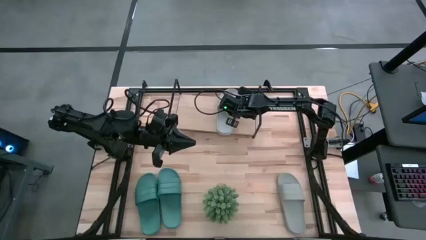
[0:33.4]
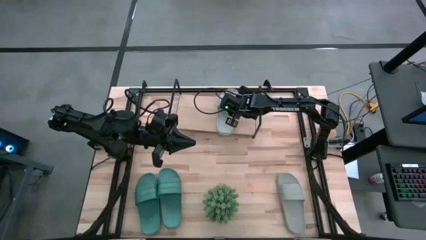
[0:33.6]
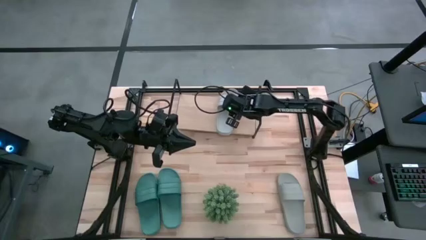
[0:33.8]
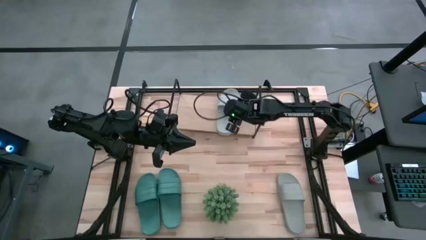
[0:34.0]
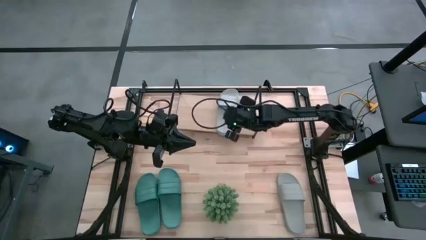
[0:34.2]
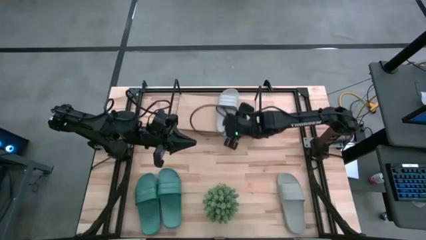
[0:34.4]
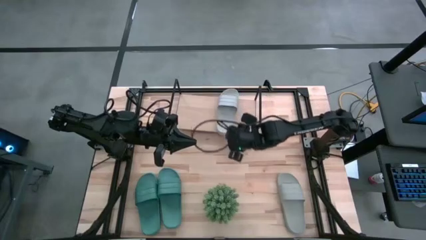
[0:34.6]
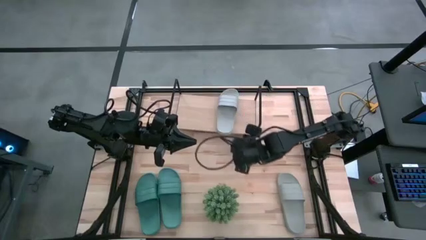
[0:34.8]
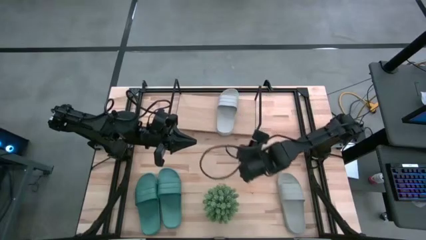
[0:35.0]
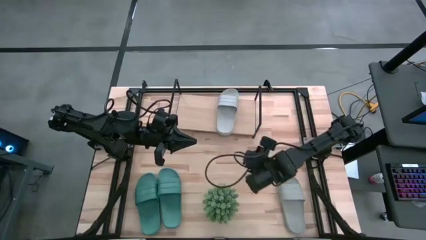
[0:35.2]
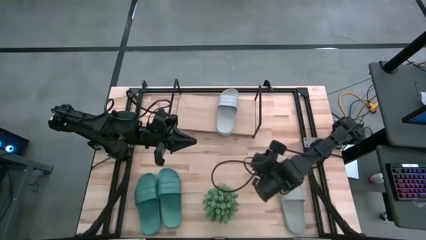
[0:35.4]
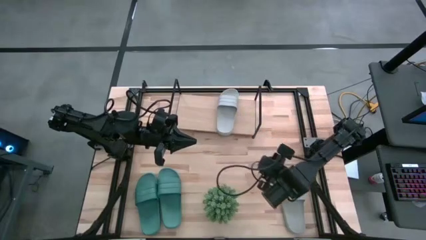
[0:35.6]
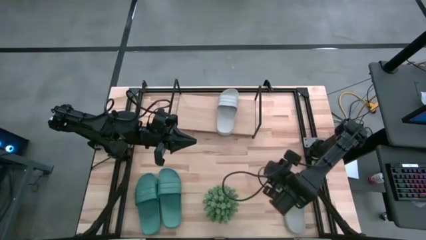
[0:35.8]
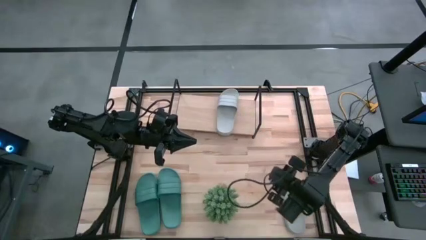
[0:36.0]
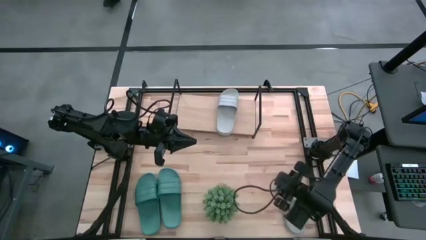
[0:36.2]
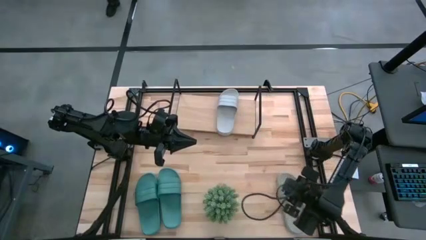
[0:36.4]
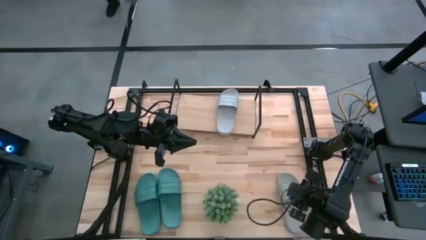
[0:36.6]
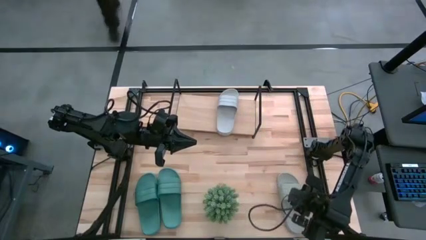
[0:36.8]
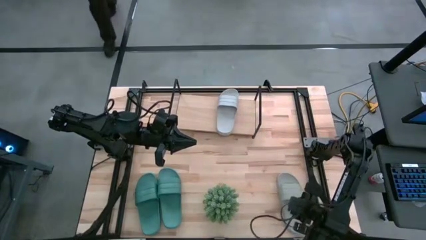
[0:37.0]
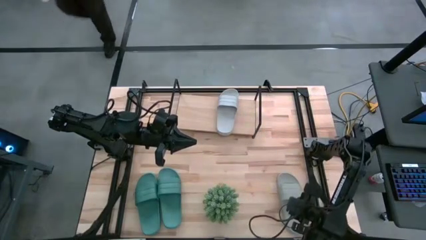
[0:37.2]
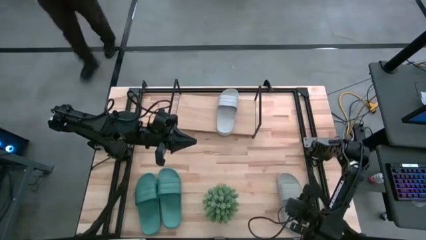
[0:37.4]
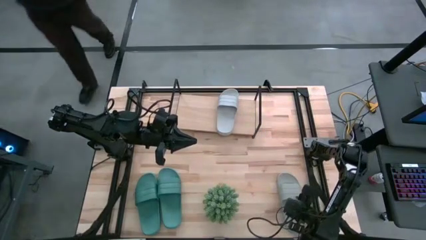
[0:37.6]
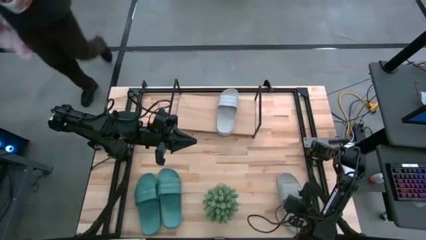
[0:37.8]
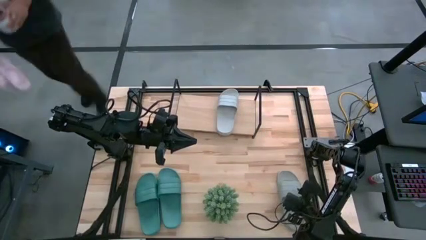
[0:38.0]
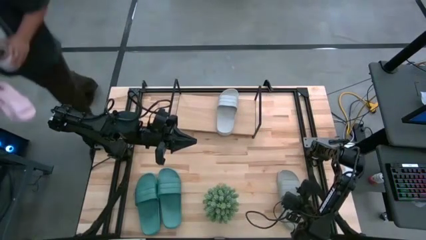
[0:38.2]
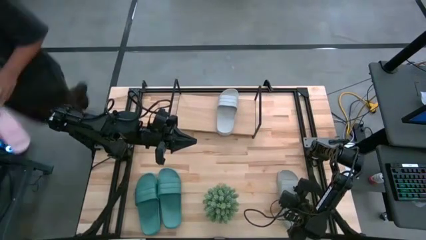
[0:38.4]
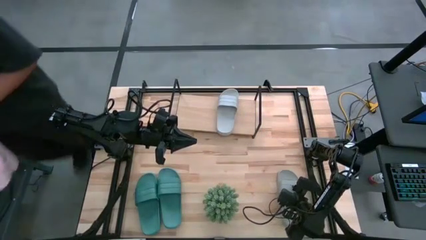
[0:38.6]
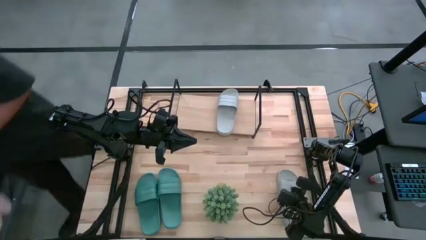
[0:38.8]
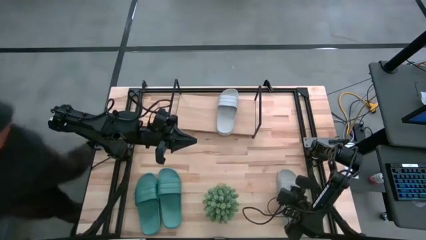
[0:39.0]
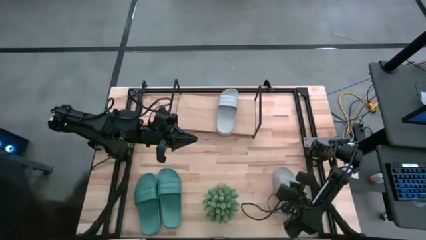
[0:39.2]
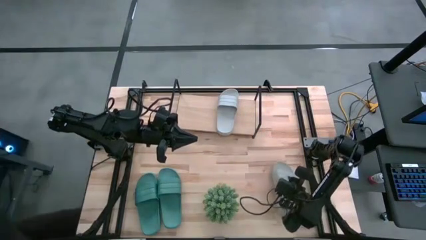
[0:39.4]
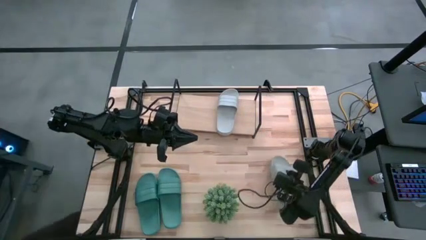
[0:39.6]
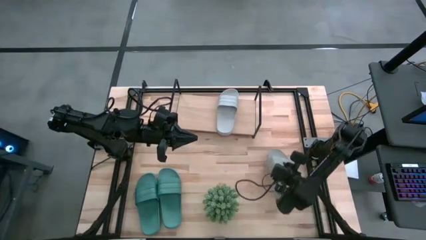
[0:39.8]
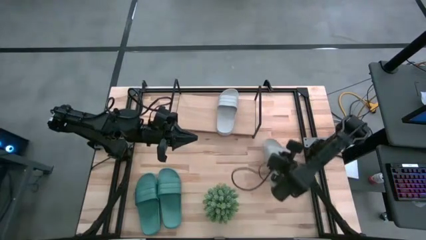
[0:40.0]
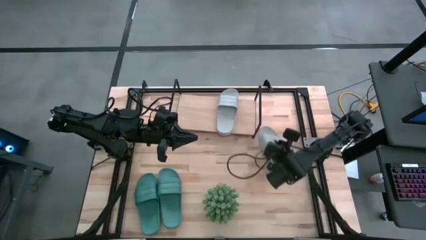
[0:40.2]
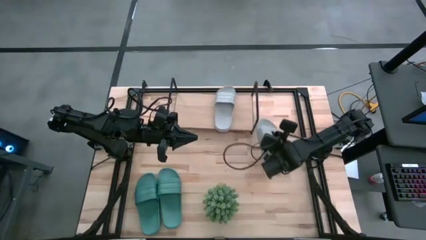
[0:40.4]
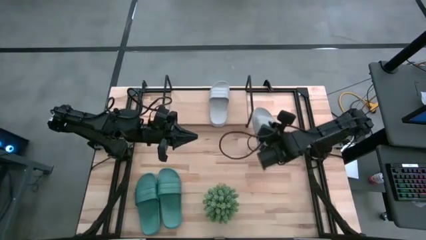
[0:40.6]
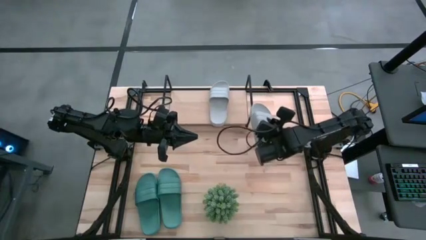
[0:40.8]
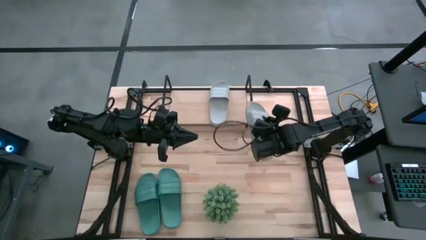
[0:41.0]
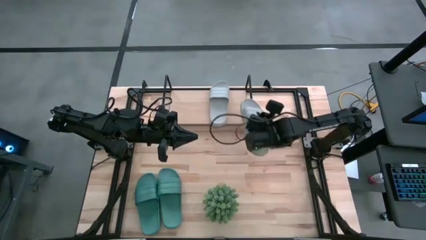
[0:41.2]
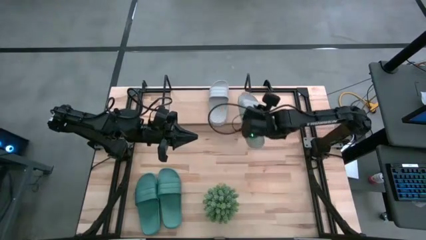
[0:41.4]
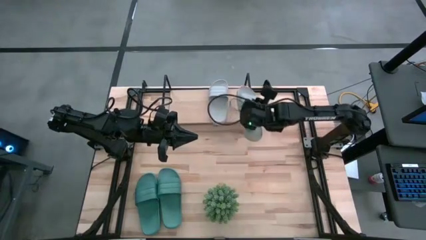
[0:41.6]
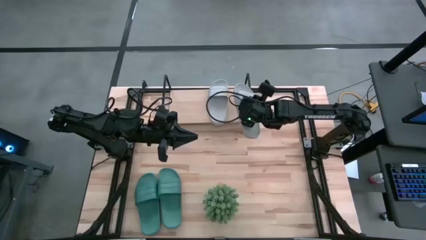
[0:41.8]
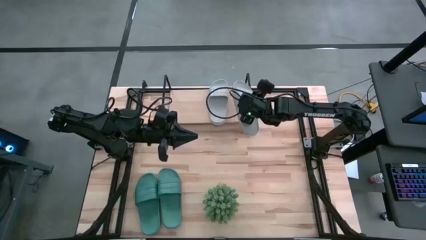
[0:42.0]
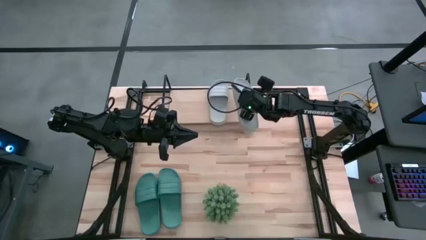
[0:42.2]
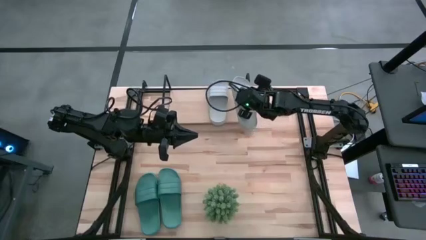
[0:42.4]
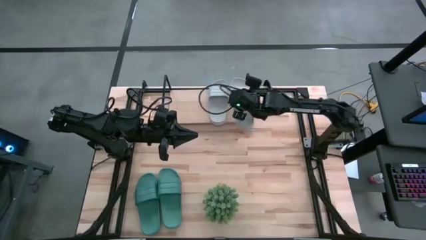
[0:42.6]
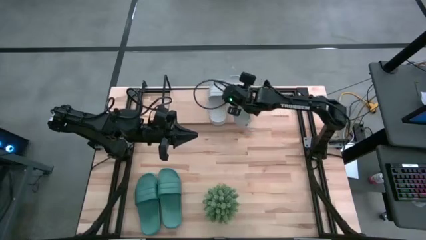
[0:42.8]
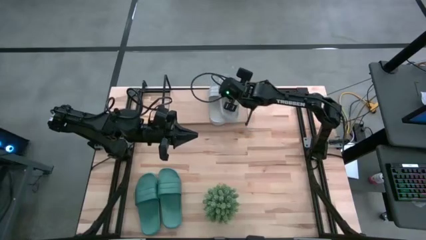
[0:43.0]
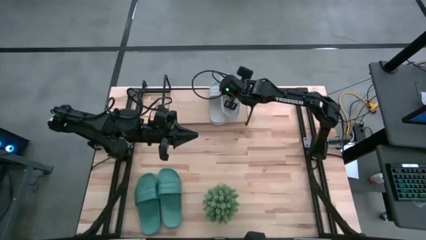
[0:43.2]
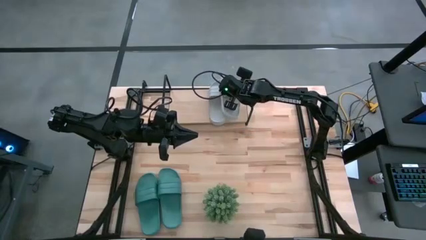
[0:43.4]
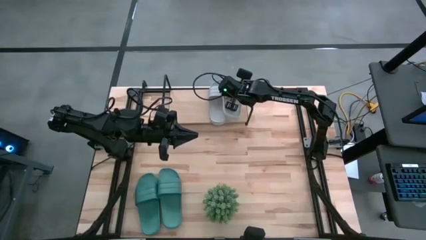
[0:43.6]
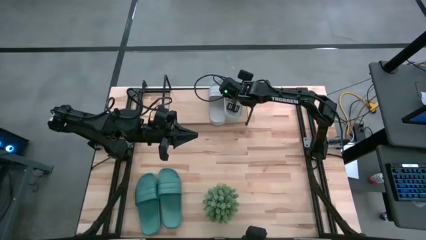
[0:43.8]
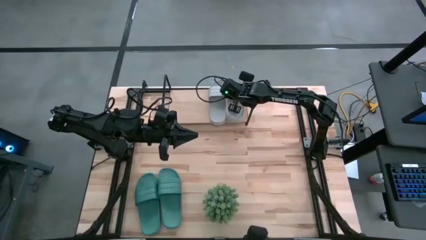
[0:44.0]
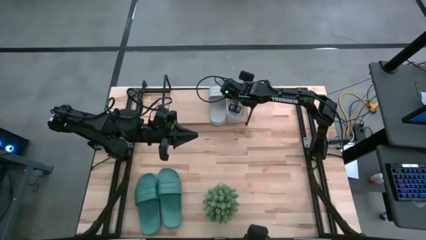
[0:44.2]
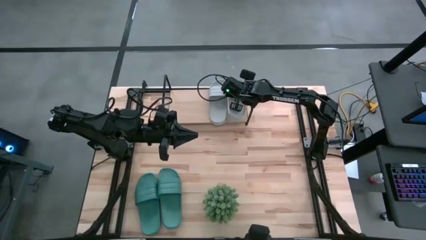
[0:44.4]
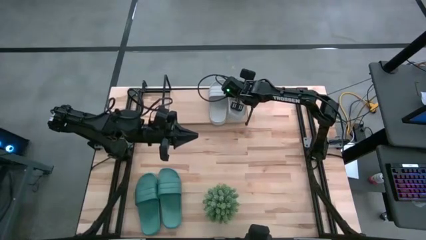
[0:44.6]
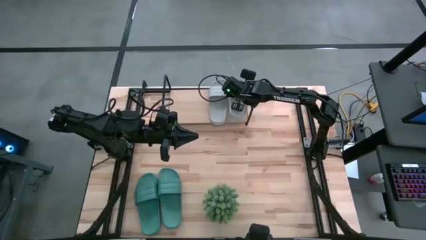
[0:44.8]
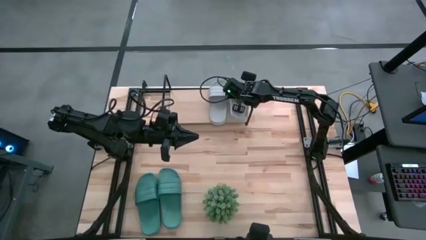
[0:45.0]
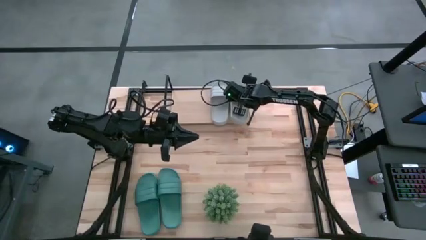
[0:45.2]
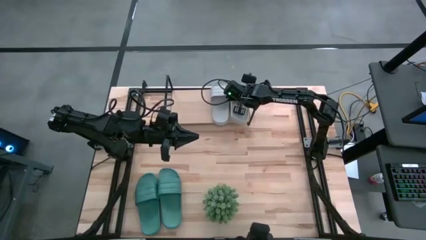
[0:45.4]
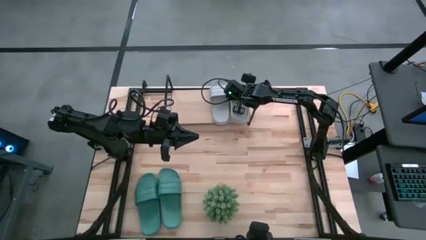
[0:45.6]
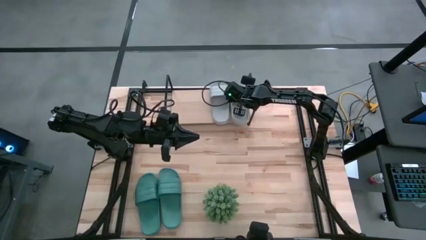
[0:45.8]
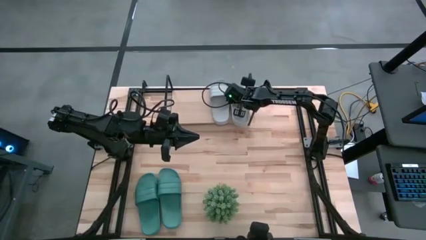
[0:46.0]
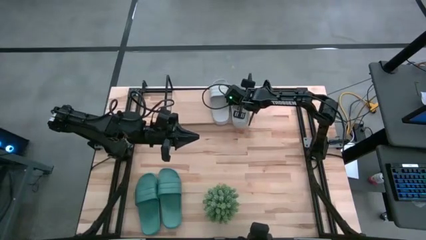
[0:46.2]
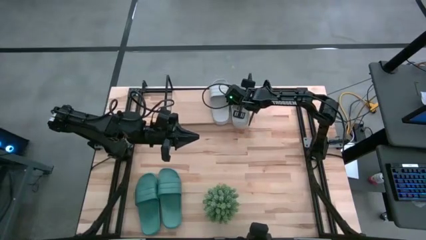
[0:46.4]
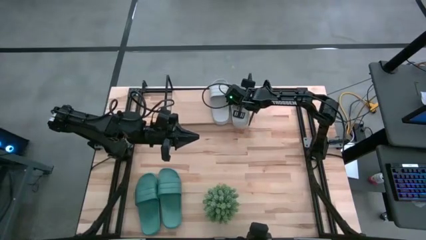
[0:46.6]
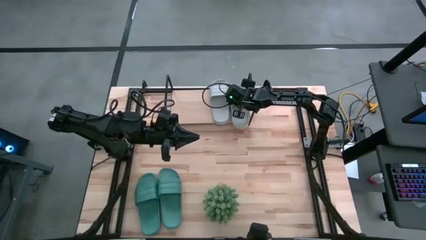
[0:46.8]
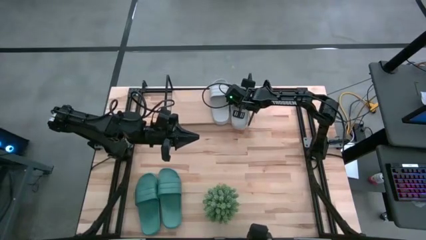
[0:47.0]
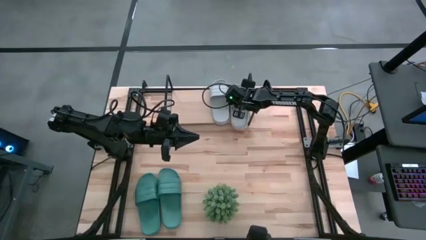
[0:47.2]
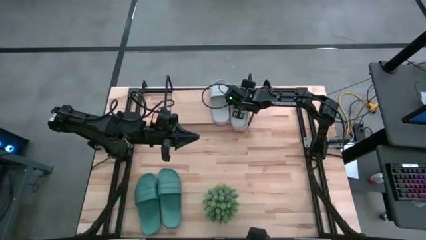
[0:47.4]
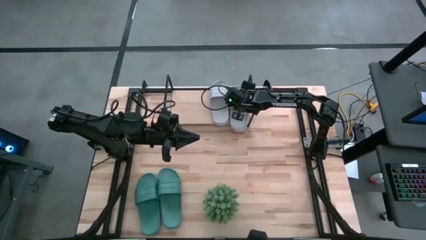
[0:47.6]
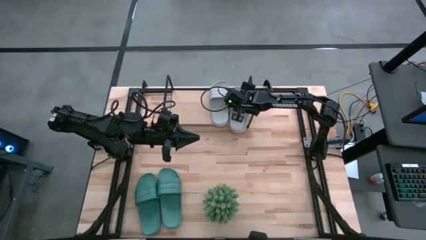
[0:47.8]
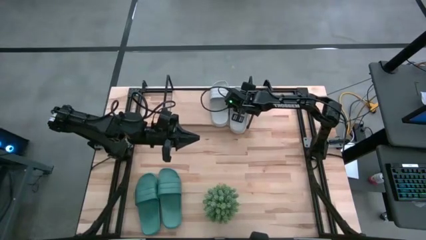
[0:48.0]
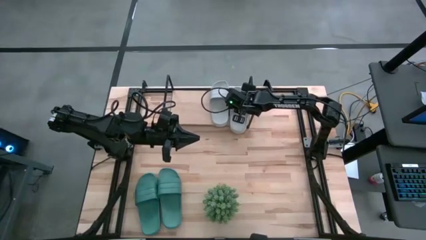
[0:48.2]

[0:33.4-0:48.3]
Task: Pick and place slides into the shelf
Put the gray slipper on the shelf
